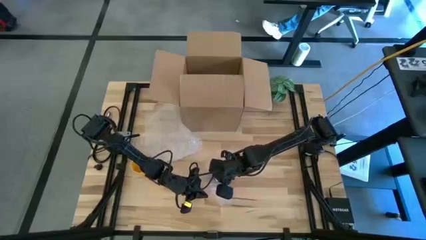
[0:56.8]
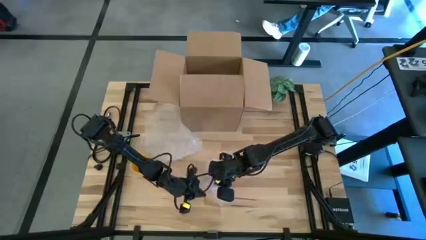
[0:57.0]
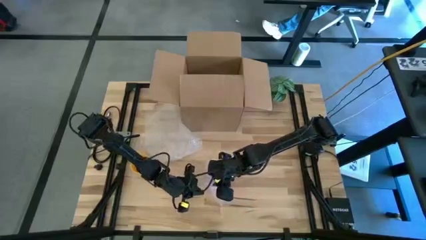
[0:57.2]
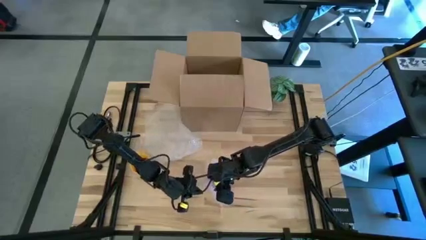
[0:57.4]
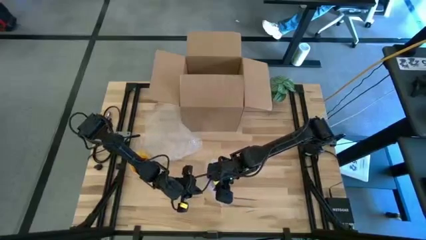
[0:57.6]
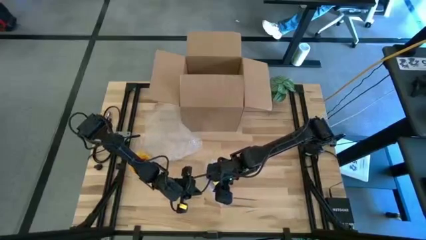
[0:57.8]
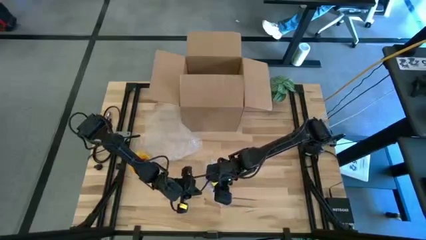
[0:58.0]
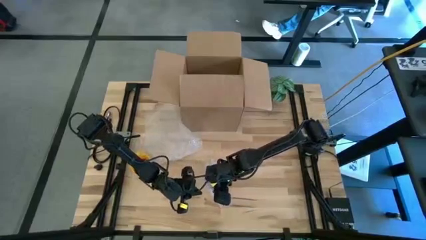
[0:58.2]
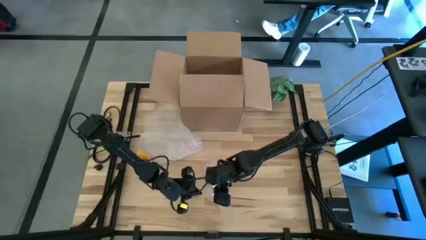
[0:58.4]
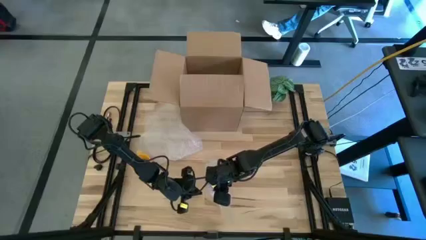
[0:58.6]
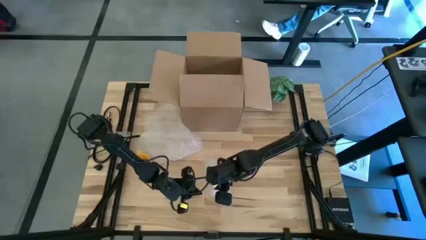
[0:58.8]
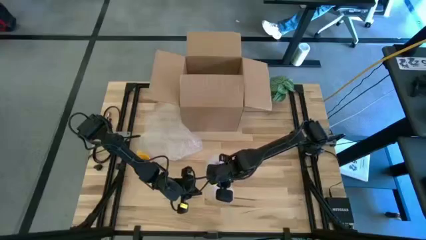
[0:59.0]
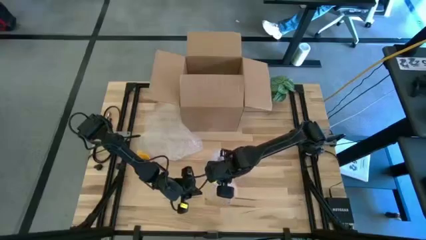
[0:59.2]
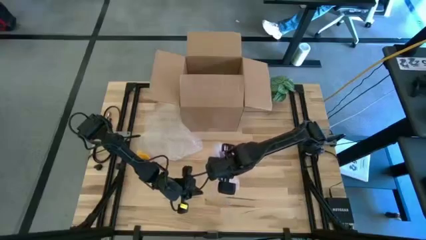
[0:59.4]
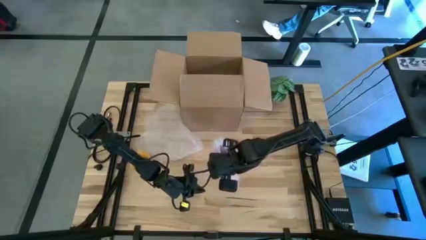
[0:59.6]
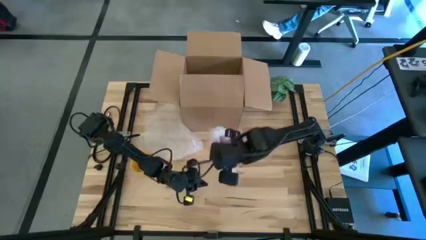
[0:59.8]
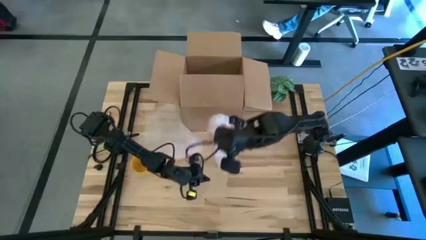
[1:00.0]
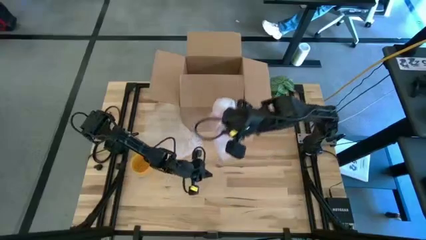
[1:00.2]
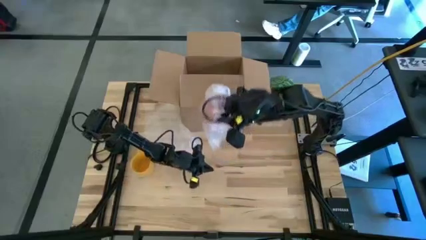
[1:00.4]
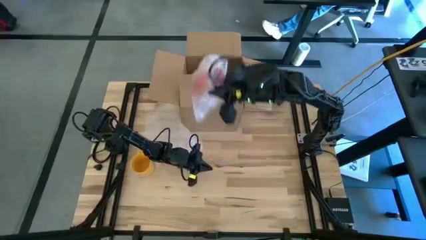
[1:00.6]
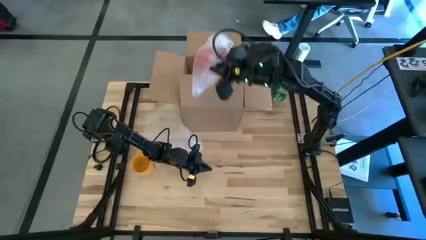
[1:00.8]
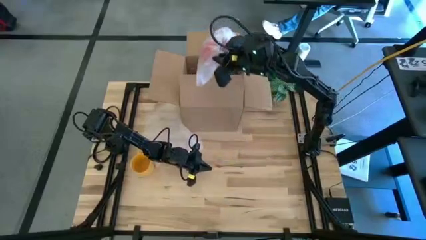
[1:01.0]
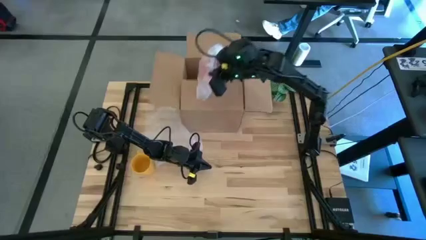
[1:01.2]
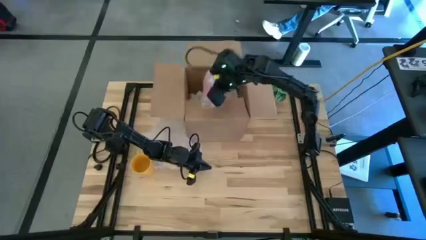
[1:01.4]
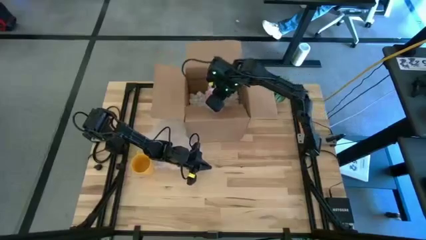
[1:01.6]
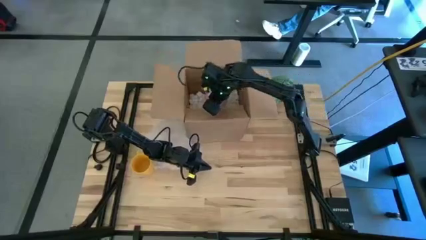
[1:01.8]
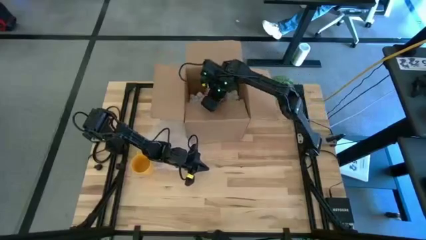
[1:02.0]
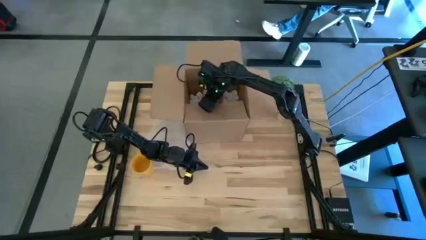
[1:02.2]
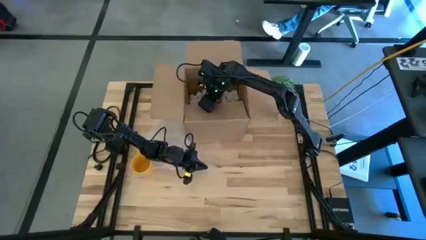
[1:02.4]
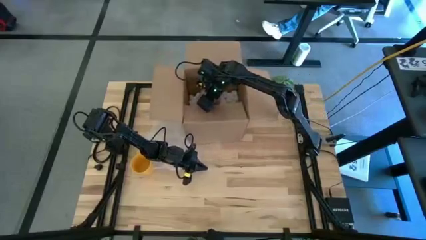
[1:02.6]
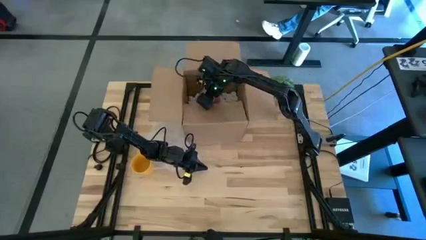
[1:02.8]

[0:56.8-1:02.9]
Task: wrap mug
Put the wrapped red mug into the box

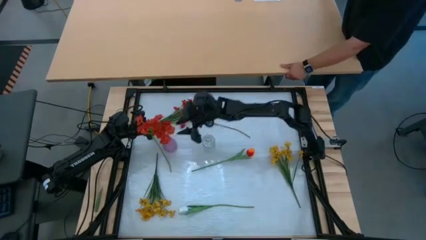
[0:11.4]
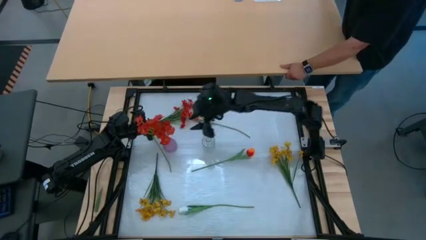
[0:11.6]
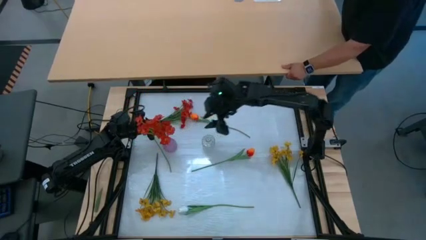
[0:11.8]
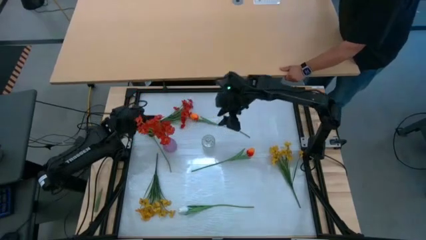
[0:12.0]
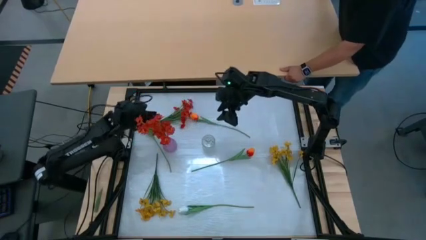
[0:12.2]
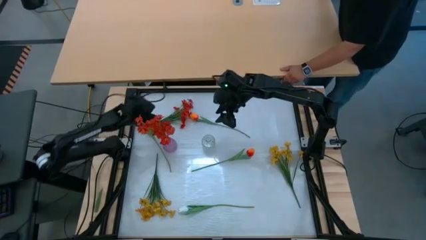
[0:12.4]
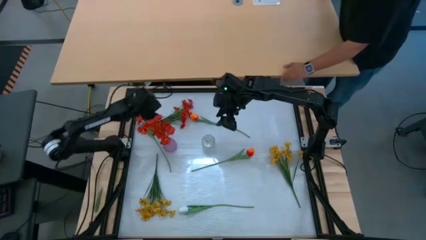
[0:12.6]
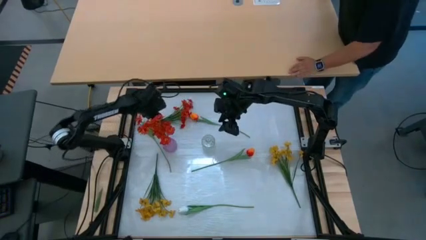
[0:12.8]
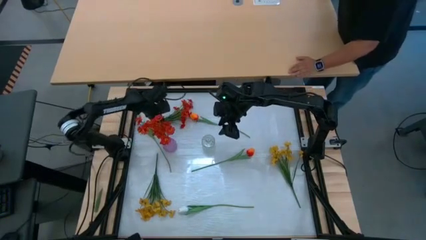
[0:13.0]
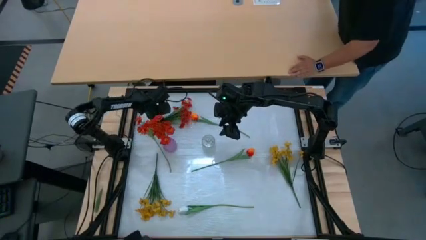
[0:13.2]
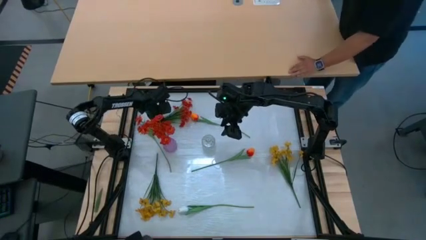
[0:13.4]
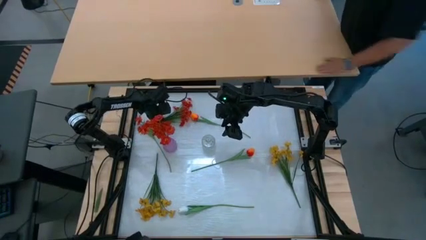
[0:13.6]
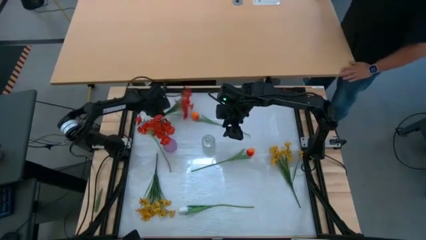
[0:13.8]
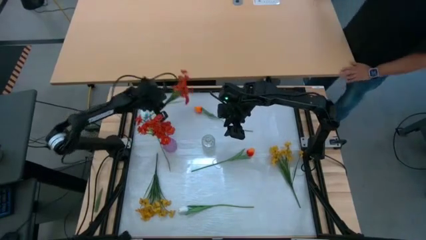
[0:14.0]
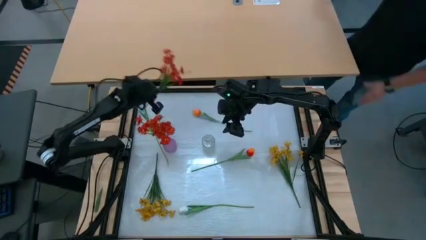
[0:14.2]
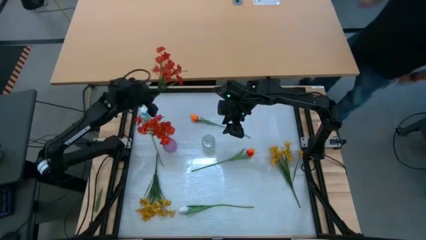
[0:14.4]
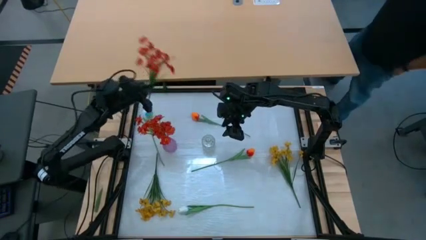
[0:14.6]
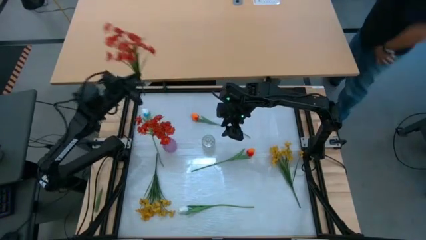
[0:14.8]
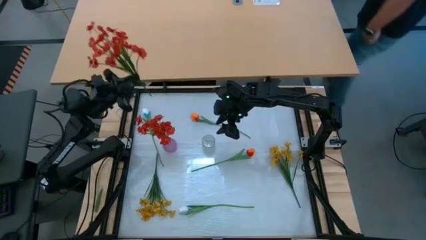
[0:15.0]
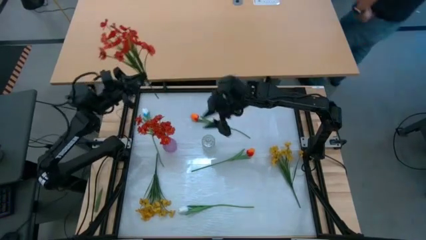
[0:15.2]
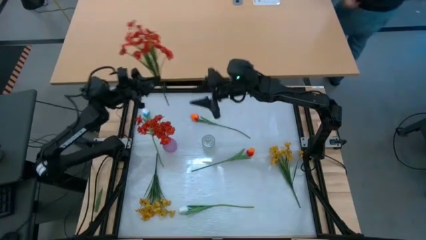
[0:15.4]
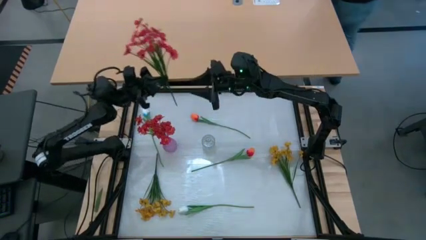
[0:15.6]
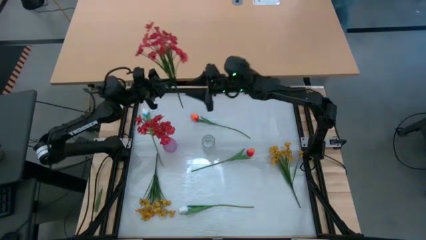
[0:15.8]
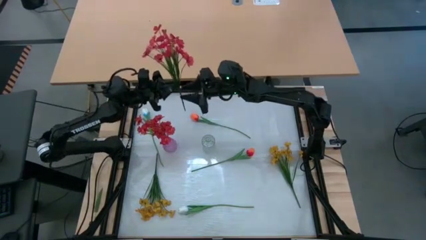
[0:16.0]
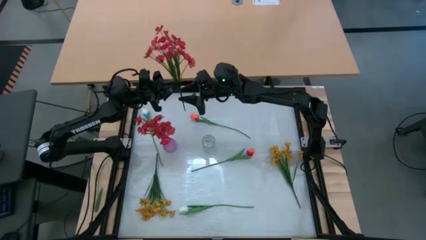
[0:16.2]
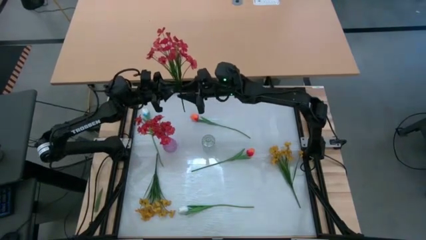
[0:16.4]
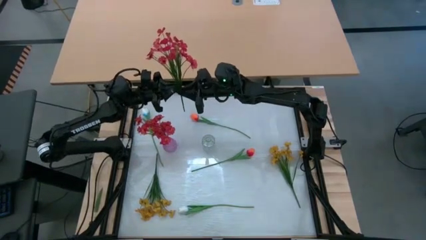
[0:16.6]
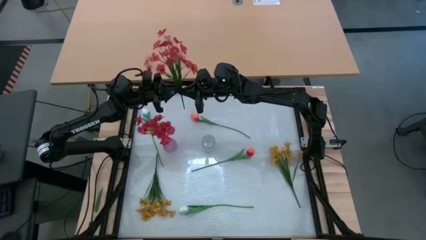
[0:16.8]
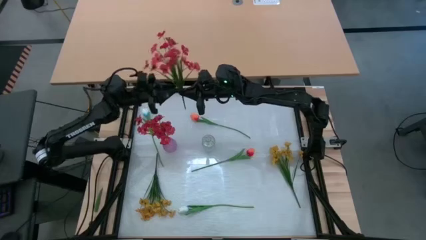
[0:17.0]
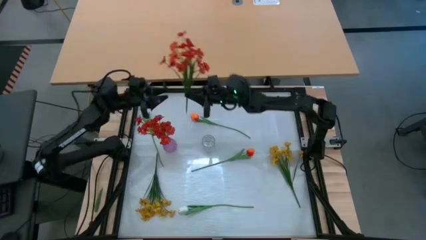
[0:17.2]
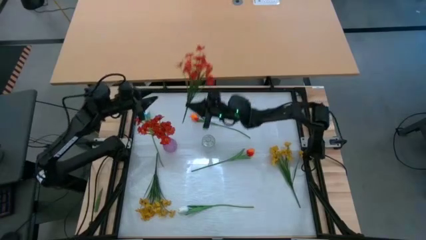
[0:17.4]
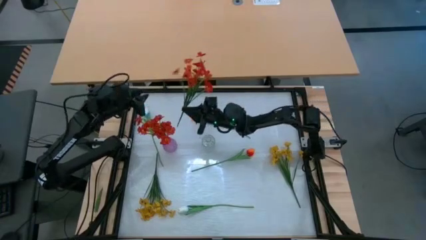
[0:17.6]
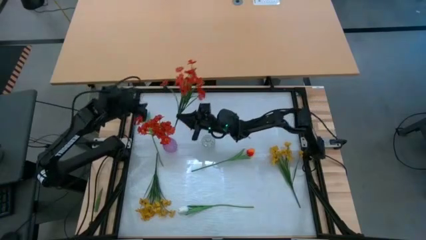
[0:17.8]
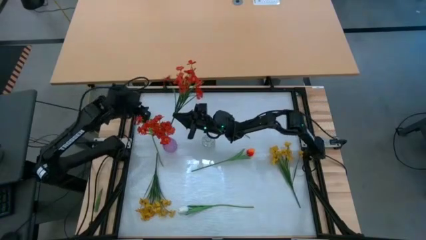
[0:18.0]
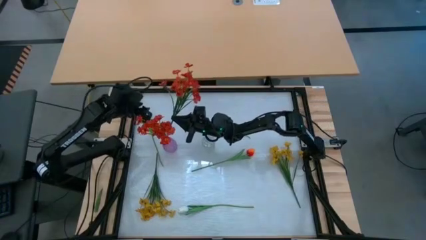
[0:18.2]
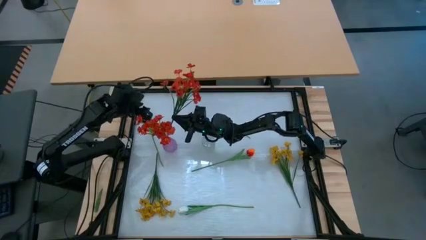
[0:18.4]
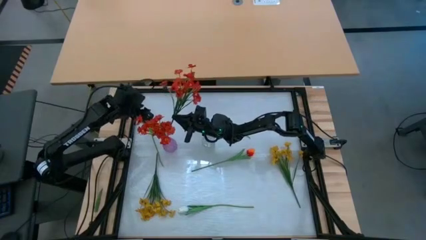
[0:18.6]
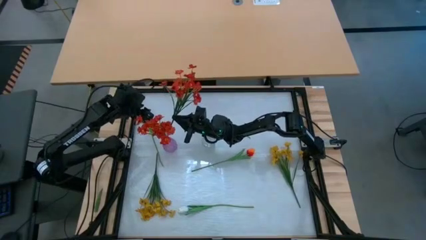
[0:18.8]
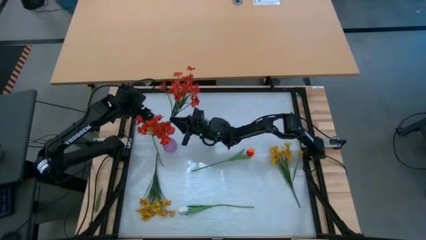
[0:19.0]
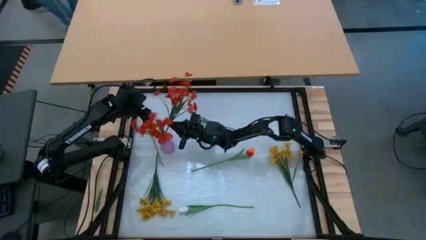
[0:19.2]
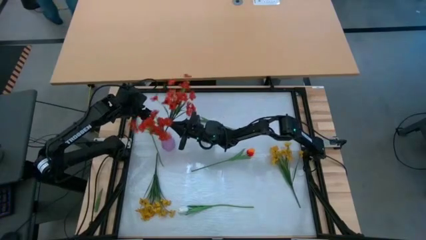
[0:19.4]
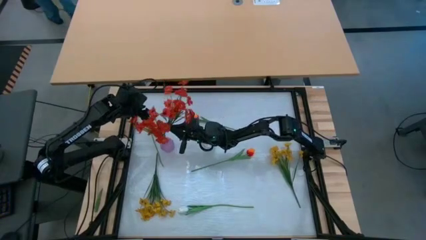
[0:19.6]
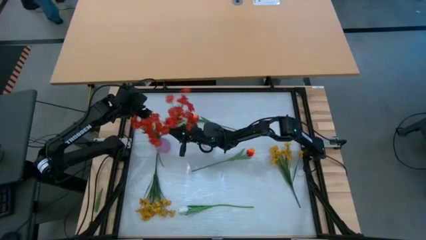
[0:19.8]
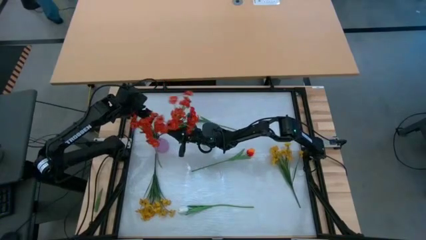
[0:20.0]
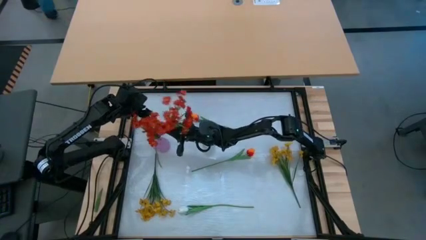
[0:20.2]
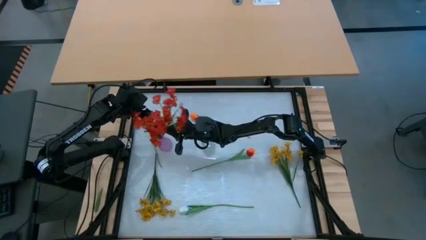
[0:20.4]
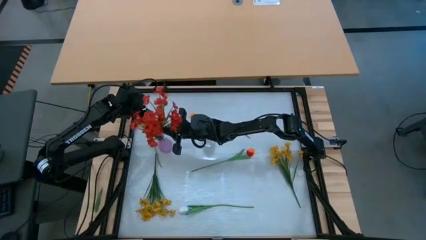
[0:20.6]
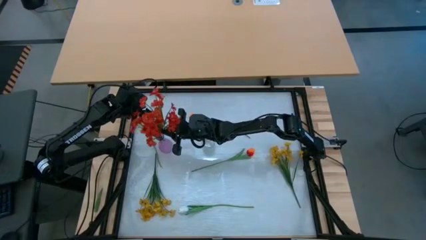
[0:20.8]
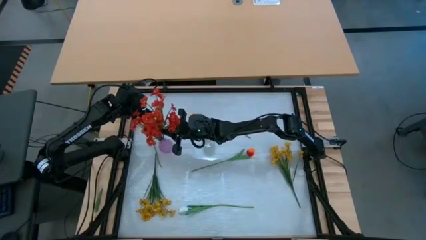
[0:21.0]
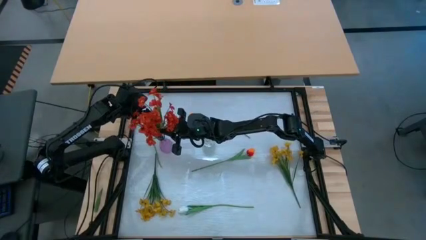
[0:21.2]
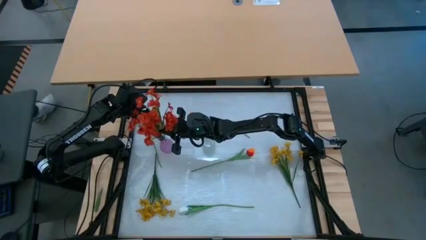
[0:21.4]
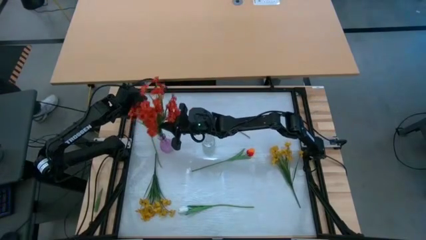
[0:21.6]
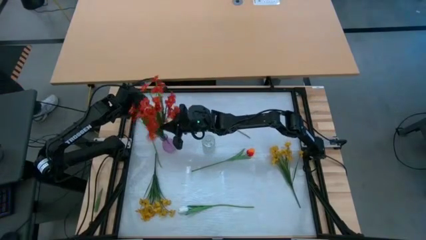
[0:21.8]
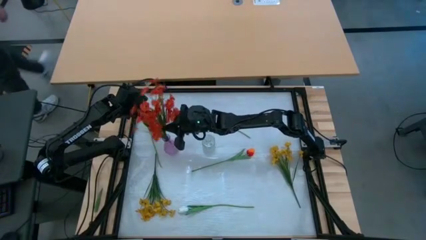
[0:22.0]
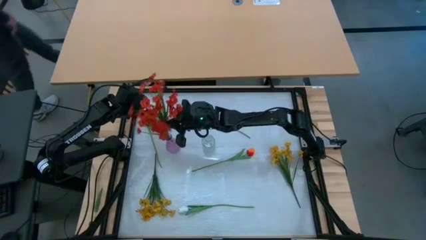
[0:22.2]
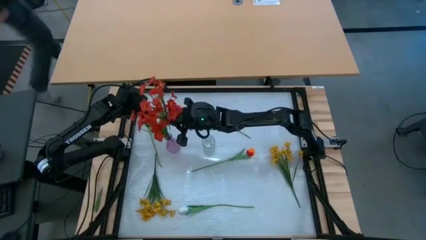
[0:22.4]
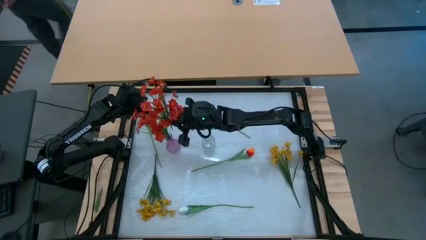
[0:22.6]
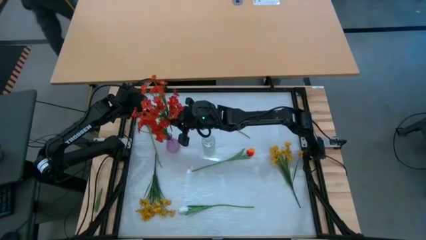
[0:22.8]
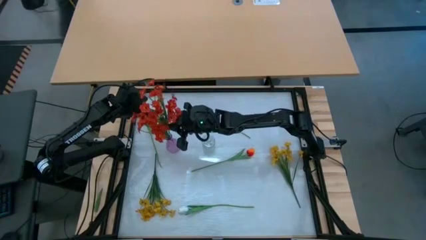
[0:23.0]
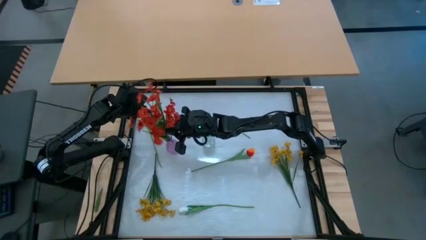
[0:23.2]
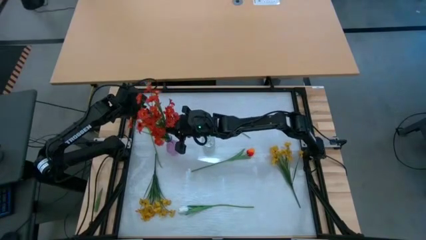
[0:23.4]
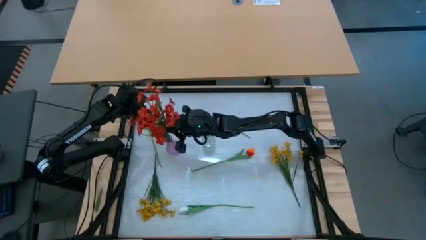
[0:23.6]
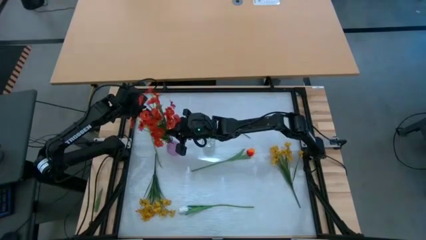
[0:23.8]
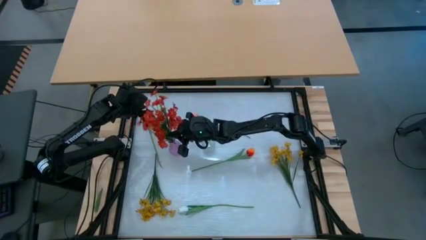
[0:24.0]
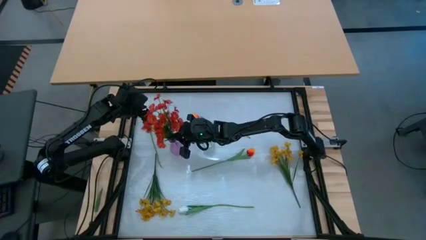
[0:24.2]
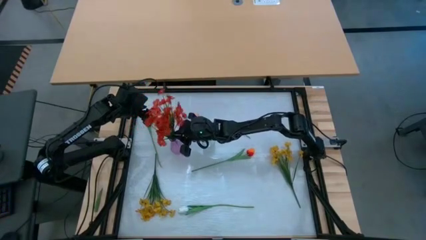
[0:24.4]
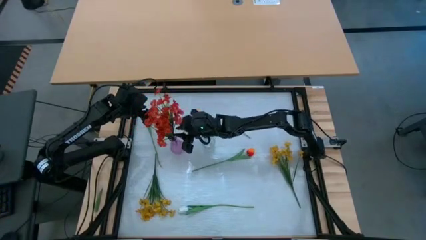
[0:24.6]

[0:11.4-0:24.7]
Task: Sort flowers into vase by color
Put the red flowers into the violet vase
